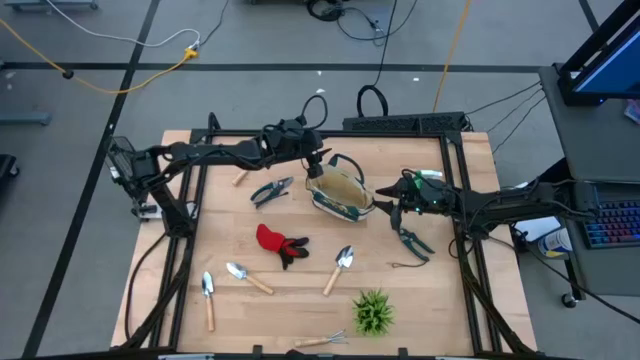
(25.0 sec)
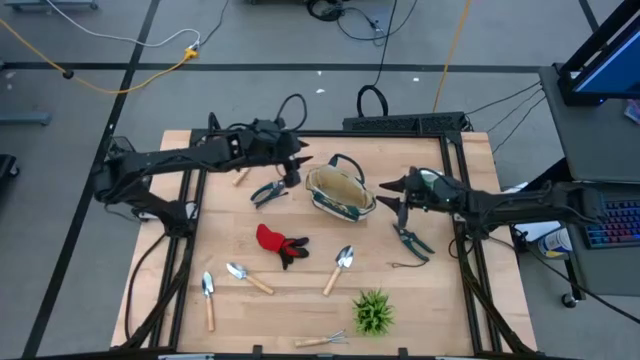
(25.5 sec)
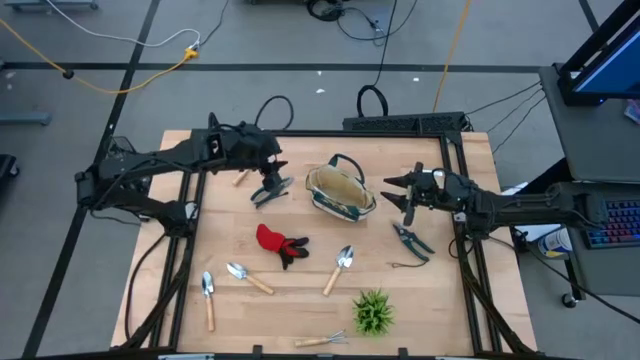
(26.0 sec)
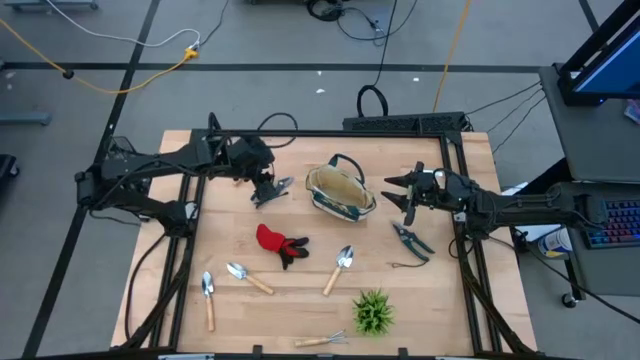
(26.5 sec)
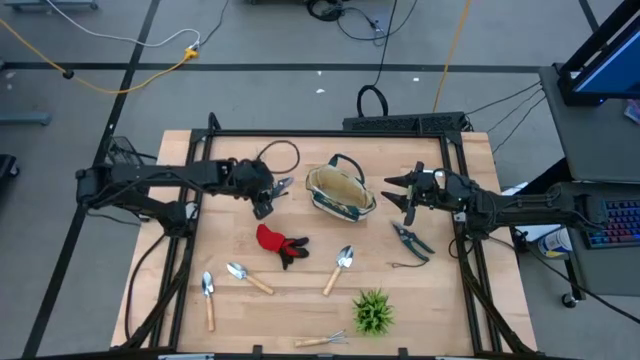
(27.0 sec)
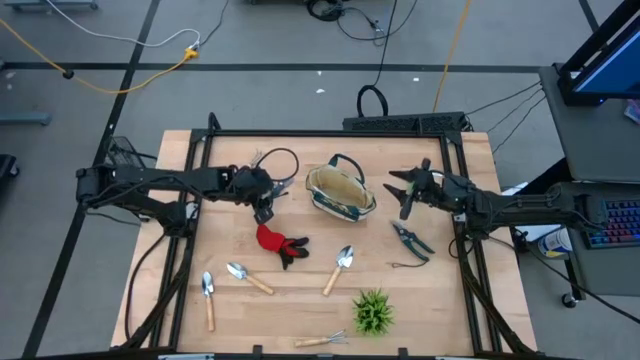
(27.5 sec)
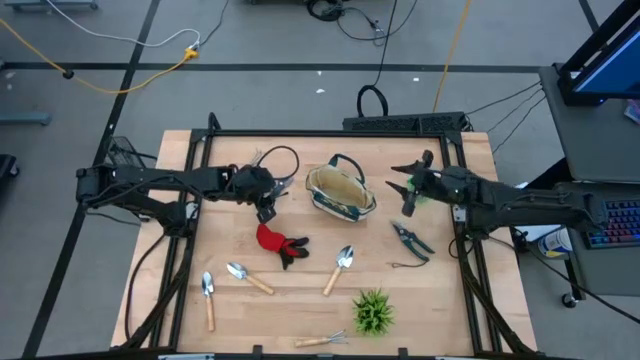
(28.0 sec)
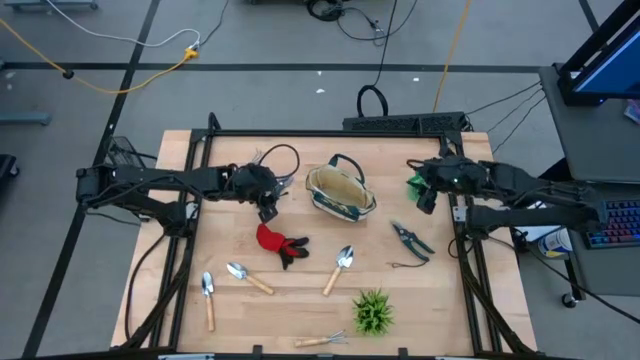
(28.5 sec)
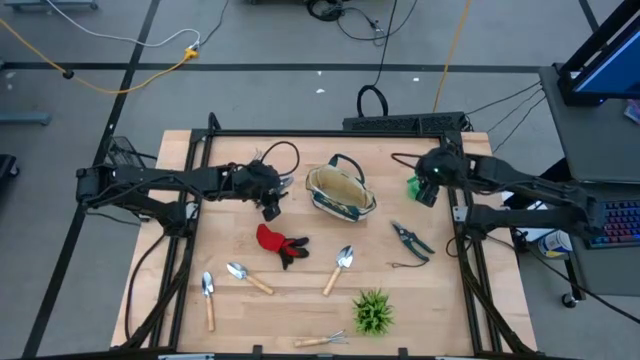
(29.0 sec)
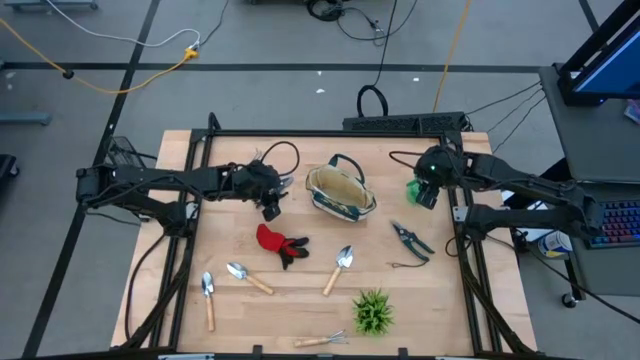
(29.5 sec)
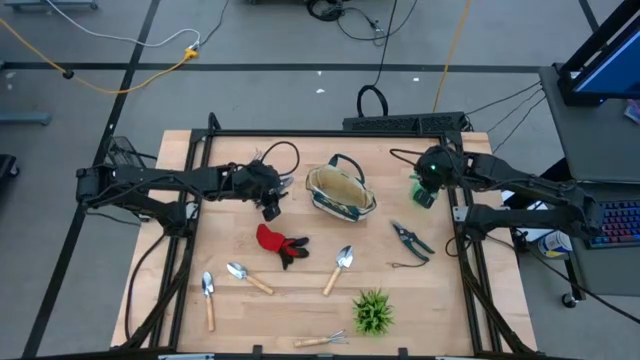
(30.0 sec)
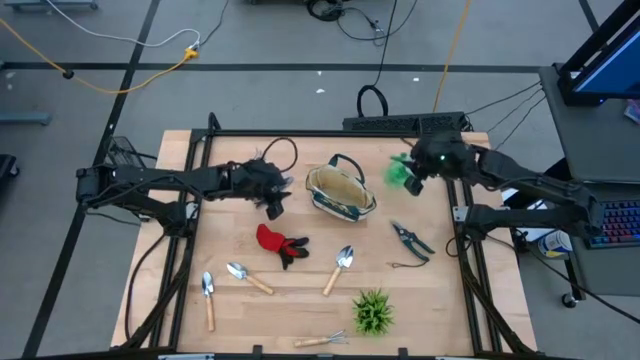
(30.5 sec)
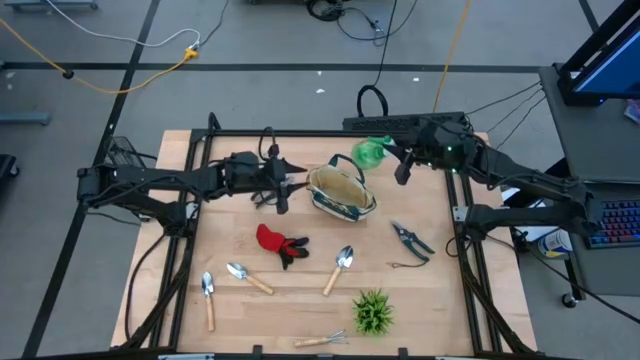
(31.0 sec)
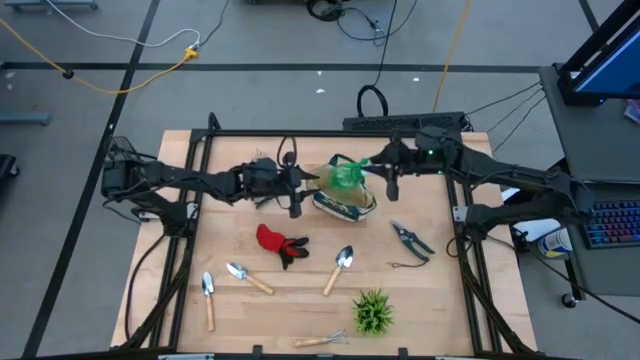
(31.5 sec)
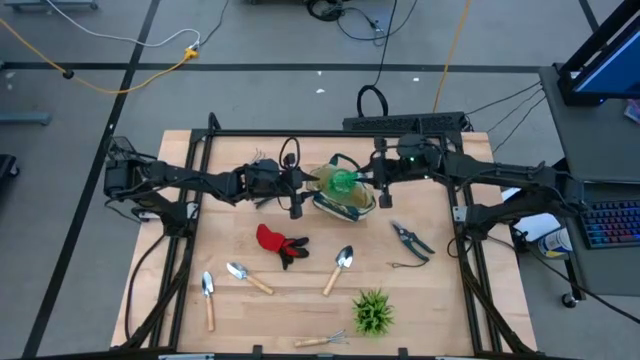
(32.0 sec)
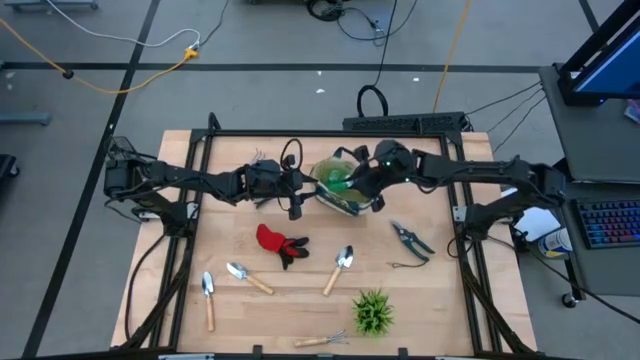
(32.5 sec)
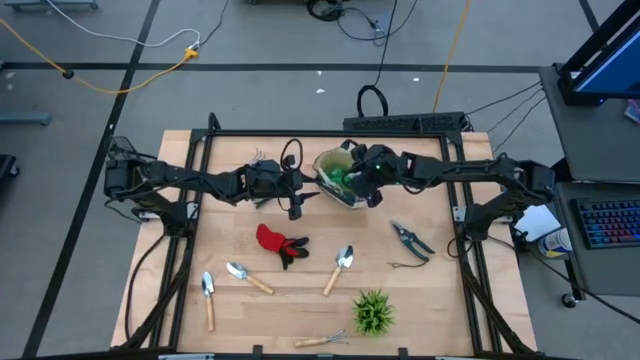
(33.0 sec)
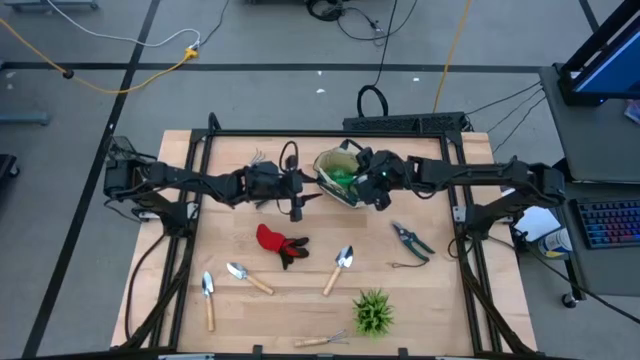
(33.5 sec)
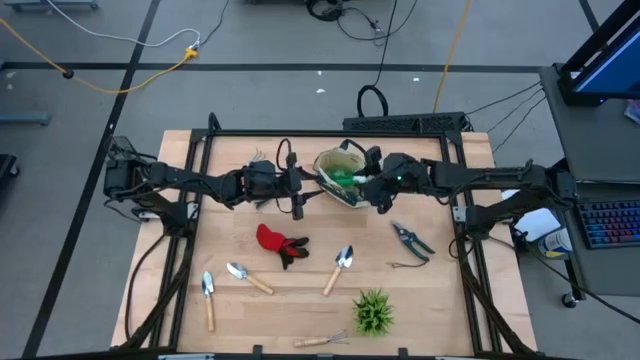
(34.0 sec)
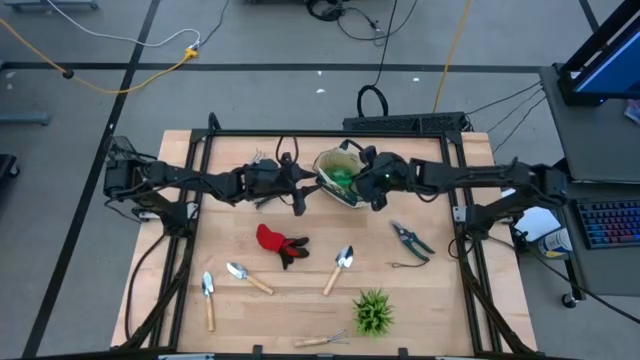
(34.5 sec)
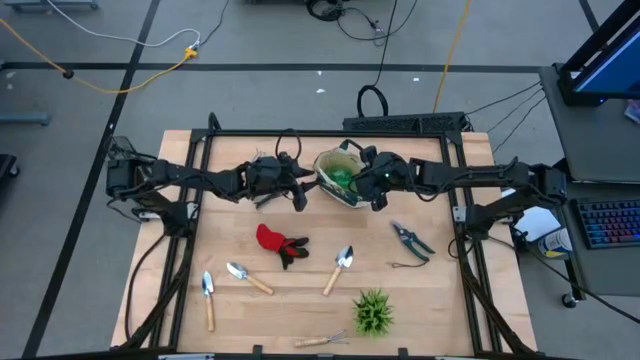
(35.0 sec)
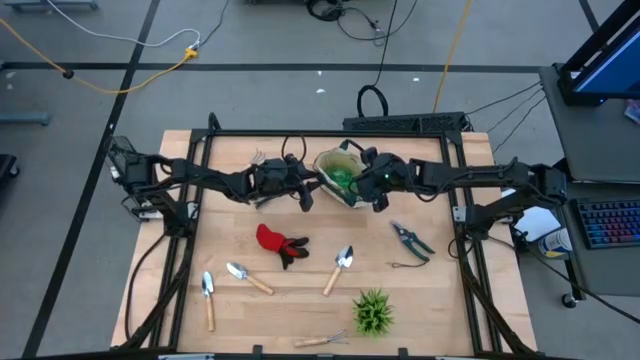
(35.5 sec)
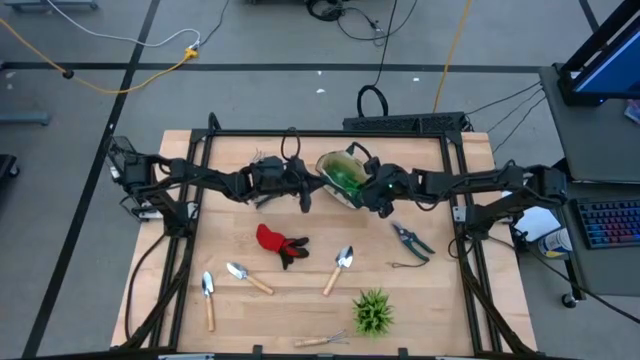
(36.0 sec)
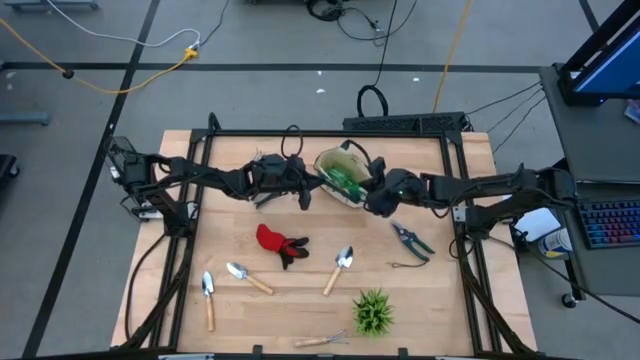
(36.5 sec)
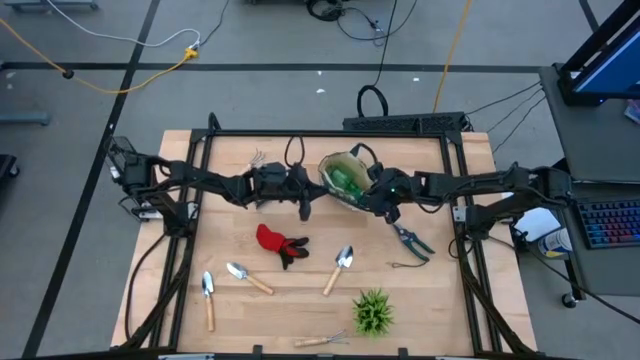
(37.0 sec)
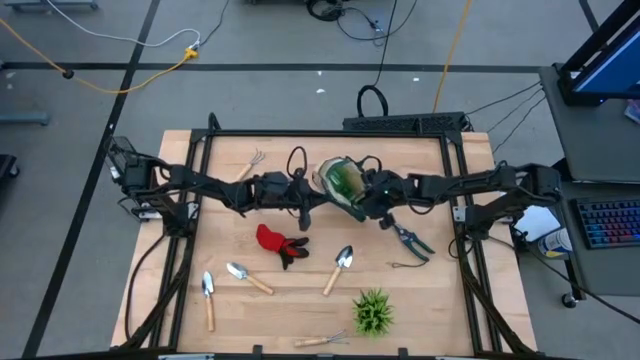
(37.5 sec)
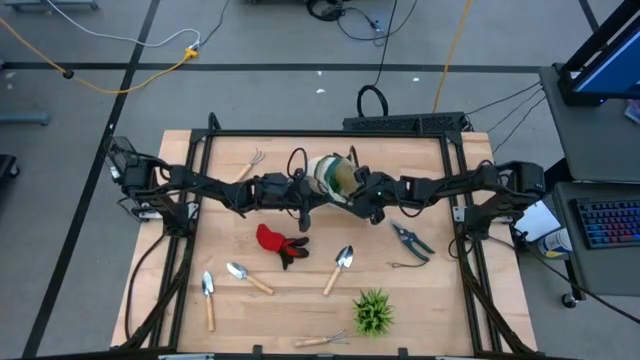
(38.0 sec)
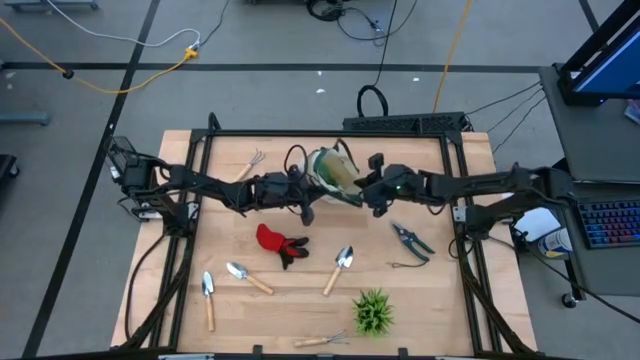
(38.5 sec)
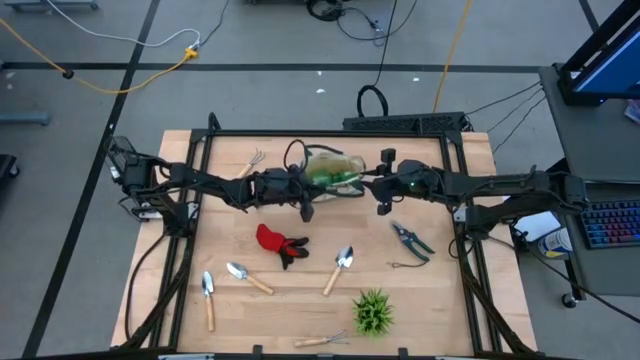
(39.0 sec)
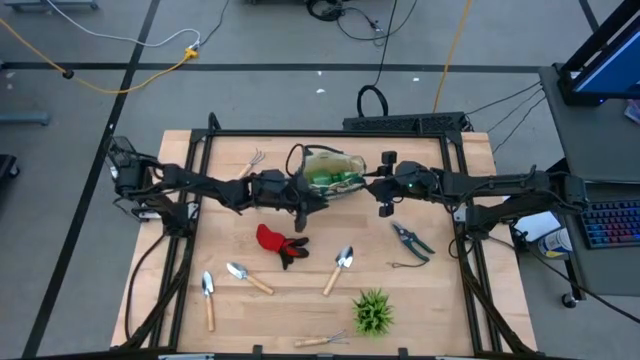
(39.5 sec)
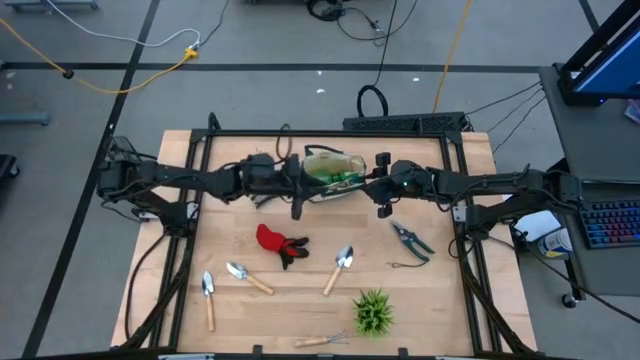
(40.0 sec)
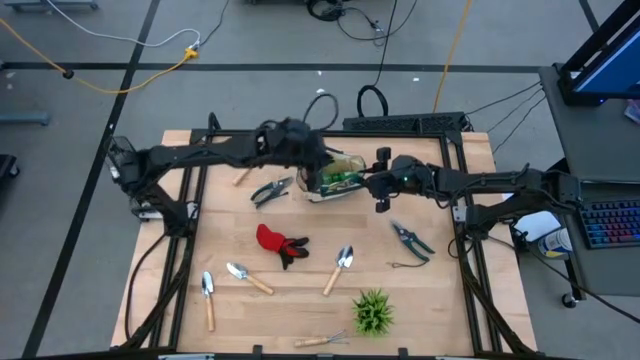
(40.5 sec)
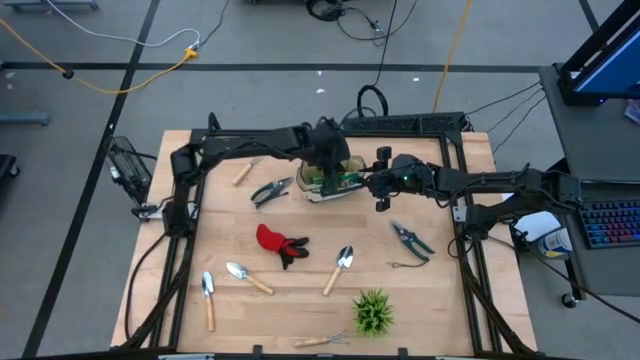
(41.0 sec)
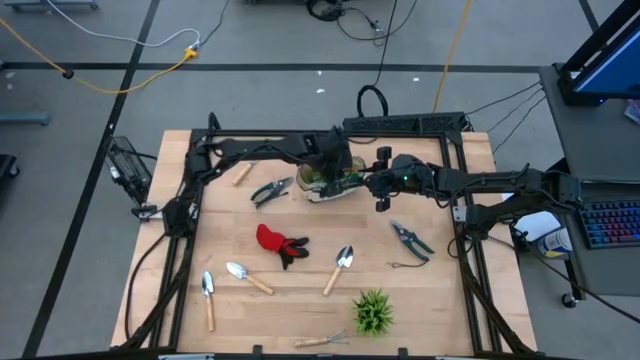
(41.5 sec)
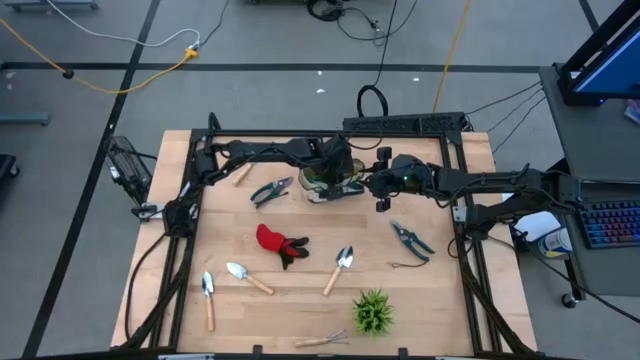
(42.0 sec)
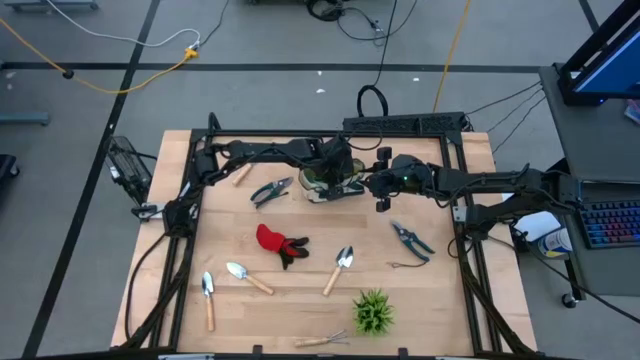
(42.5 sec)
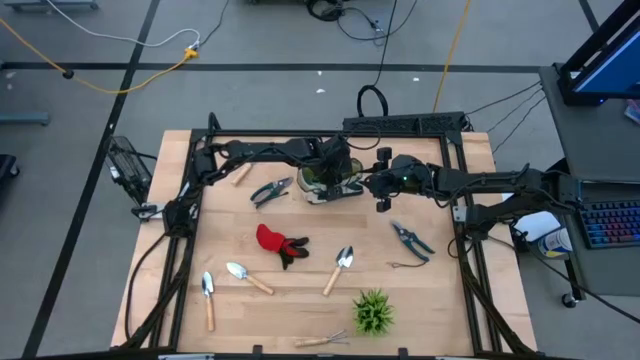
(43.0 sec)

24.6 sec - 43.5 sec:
Task: Pick & Place Garden tools in Gardening bag
Put the green spray bottle into the gardening bag

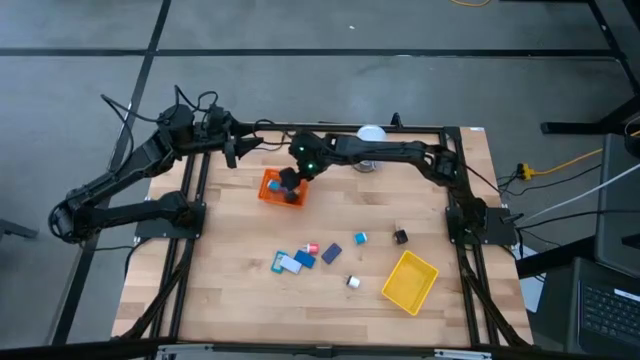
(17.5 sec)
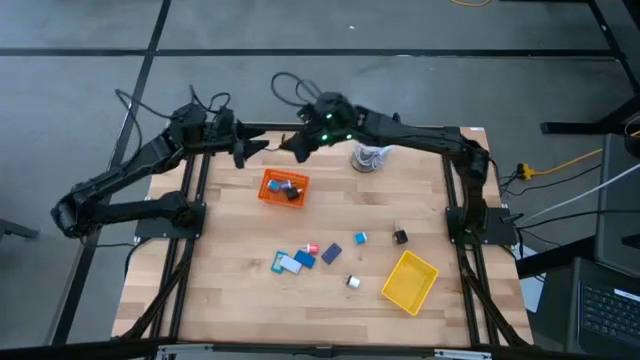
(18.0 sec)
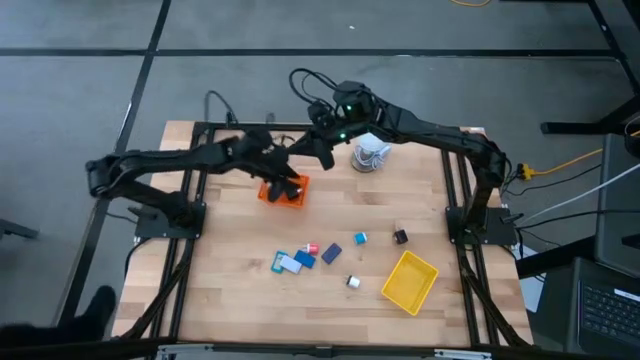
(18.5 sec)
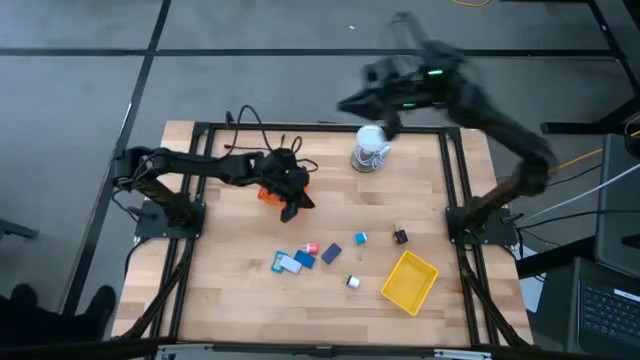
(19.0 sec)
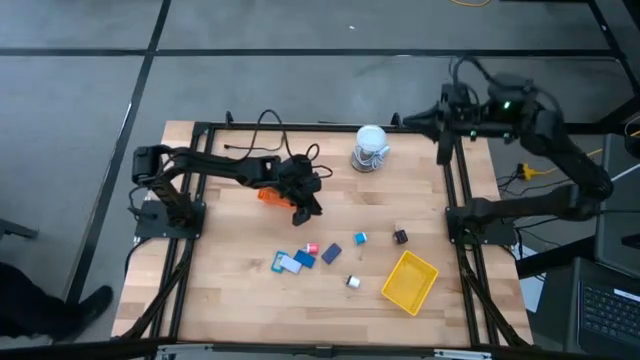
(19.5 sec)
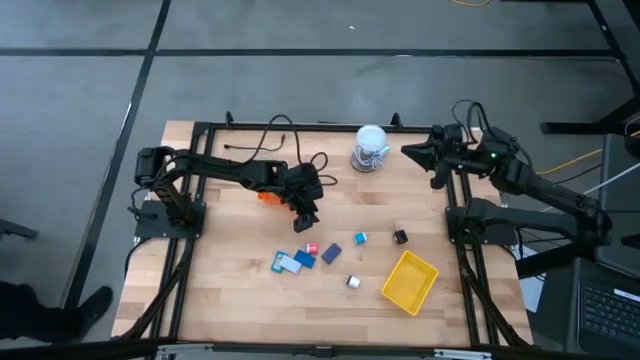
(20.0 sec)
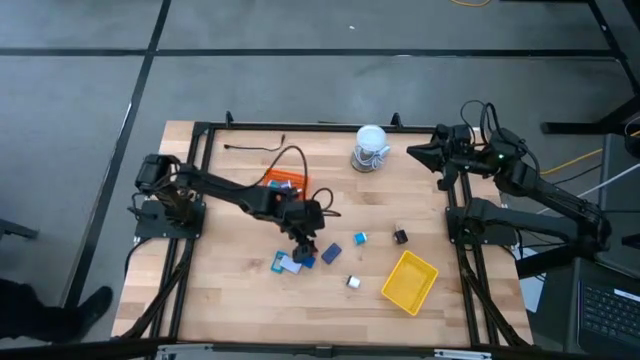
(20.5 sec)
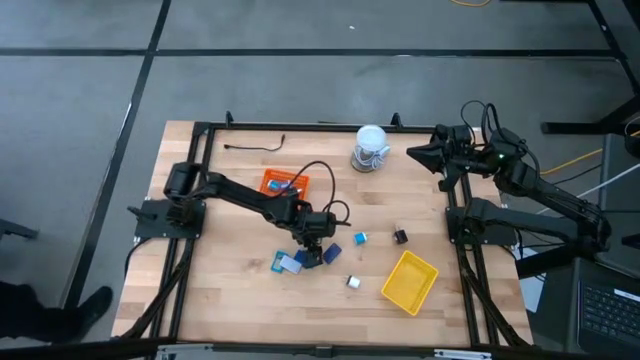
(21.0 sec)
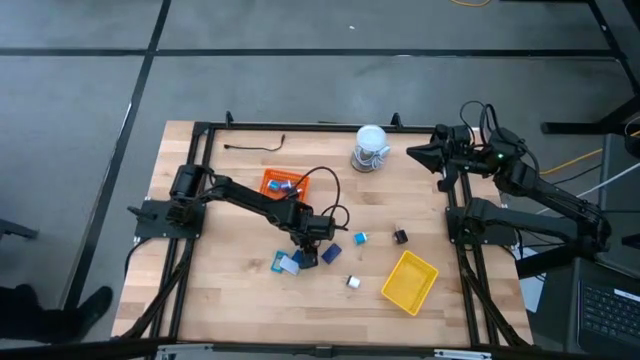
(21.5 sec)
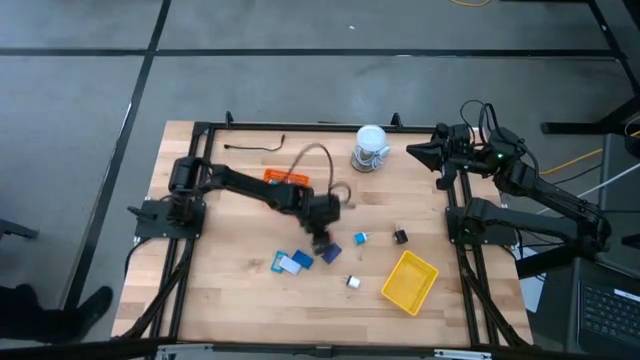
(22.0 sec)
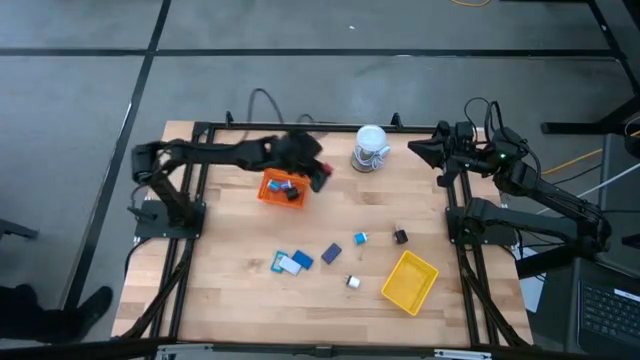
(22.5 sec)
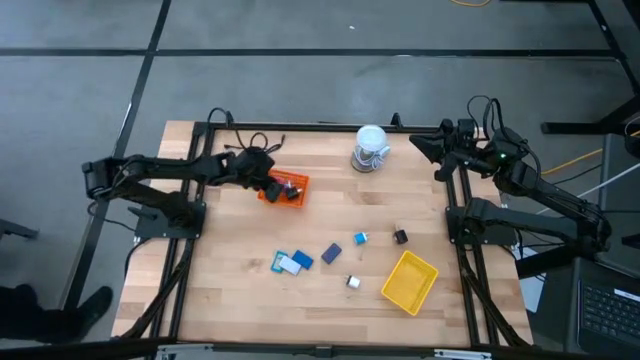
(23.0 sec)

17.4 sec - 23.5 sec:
Task: Pick & Place Office items
Put the pink charger adapter into the orange basket
